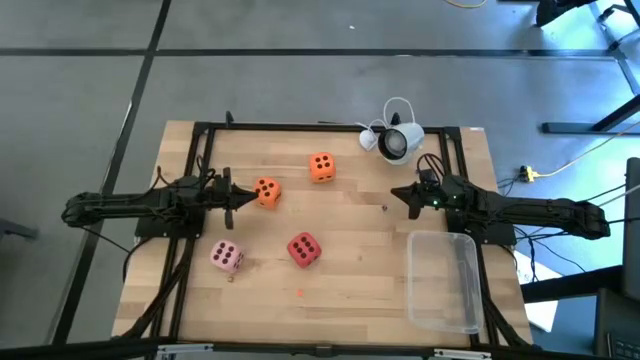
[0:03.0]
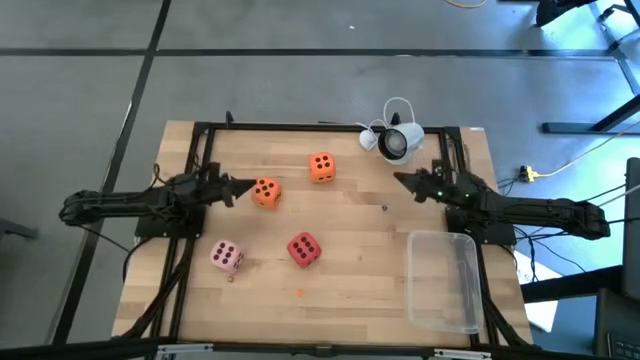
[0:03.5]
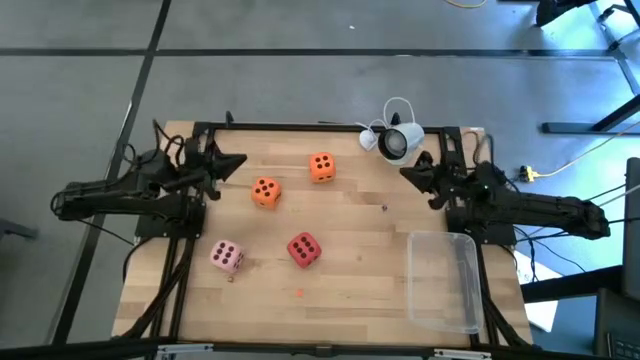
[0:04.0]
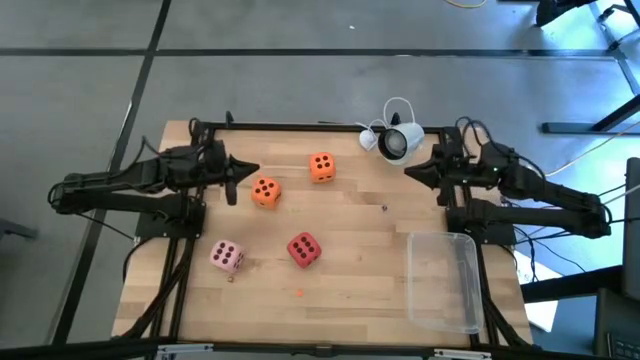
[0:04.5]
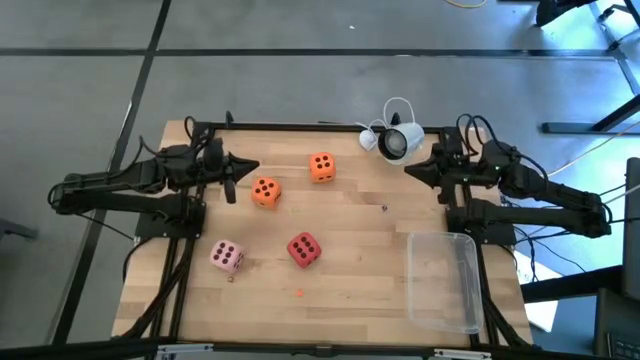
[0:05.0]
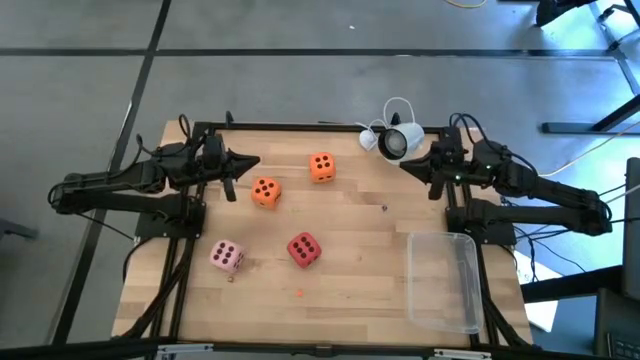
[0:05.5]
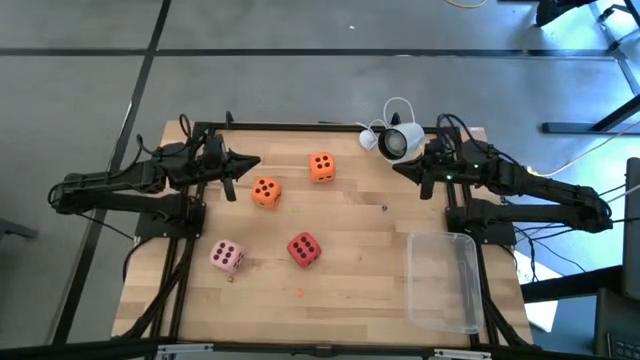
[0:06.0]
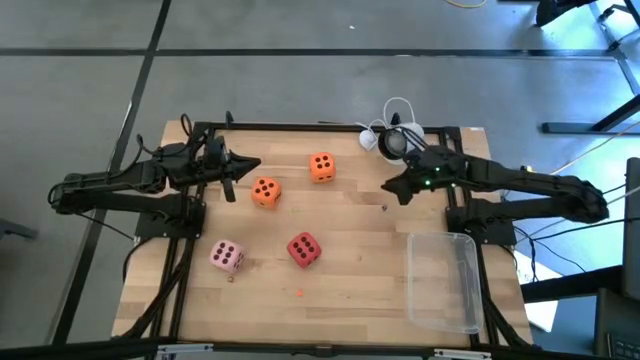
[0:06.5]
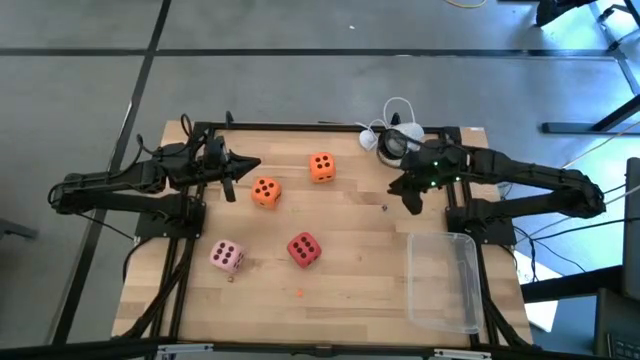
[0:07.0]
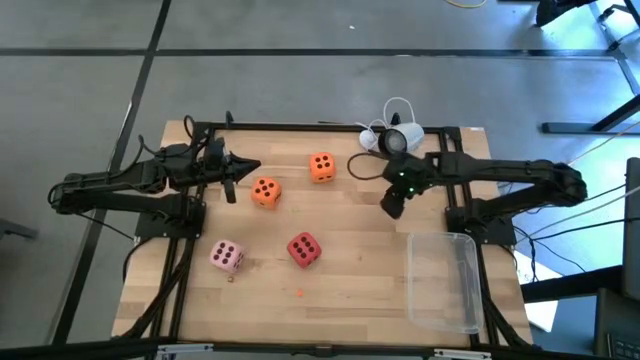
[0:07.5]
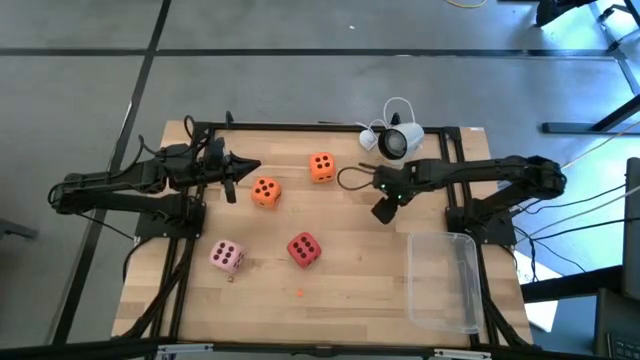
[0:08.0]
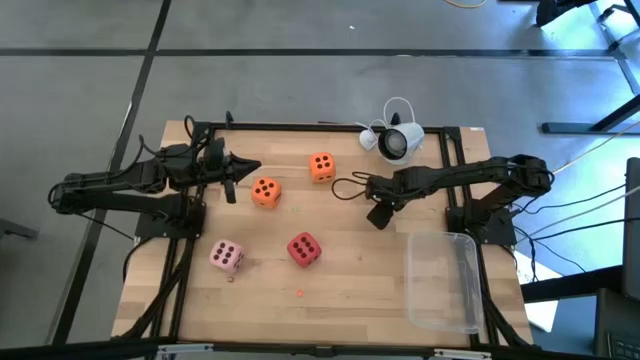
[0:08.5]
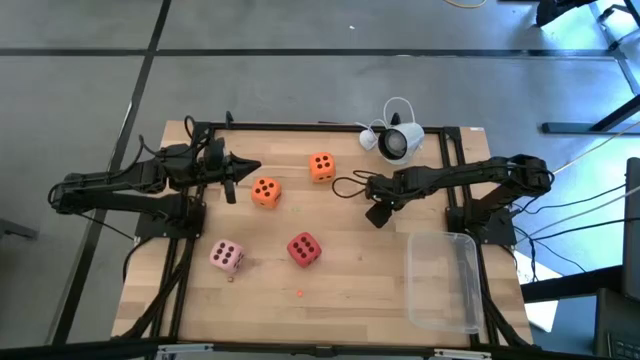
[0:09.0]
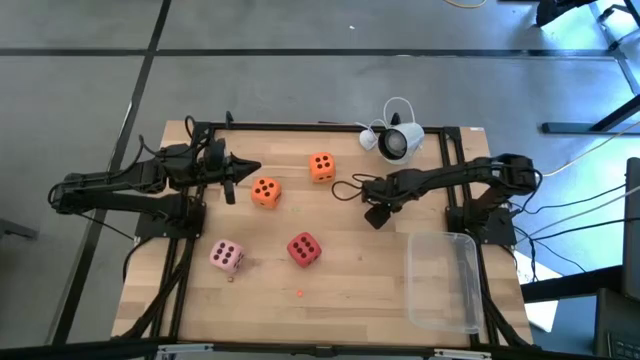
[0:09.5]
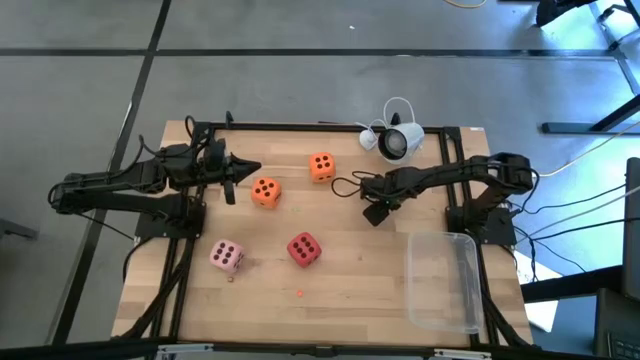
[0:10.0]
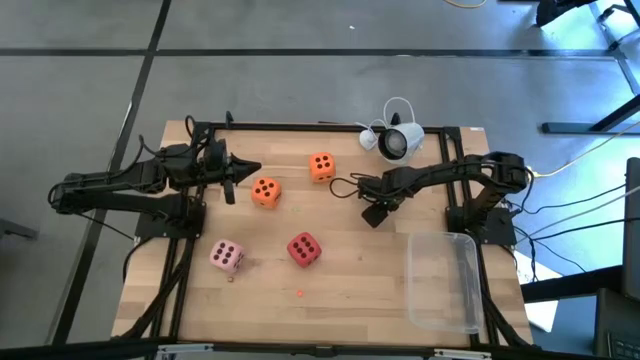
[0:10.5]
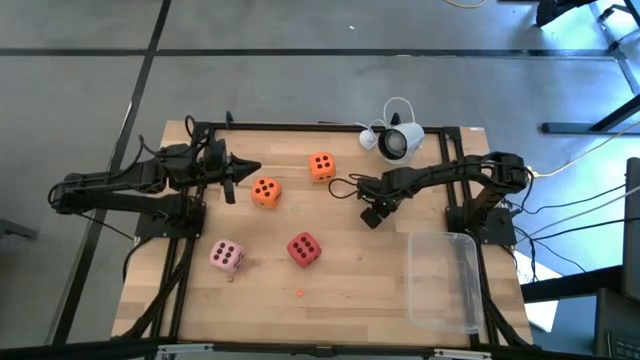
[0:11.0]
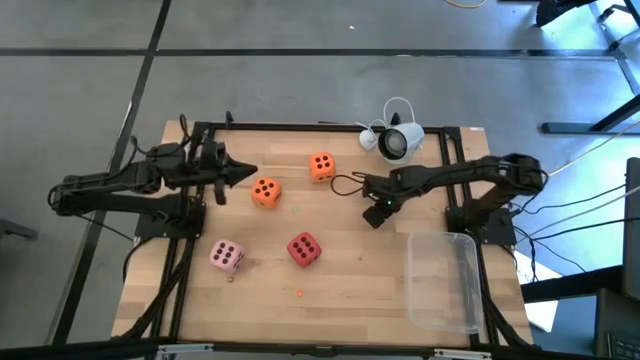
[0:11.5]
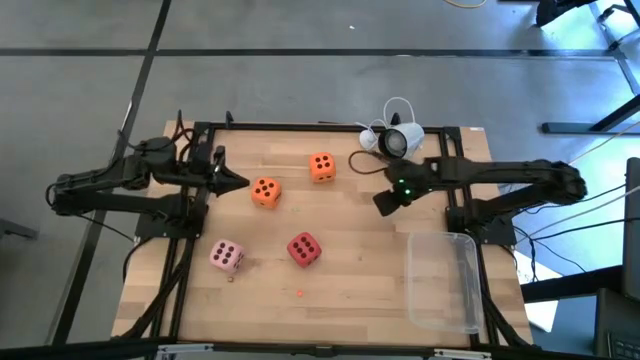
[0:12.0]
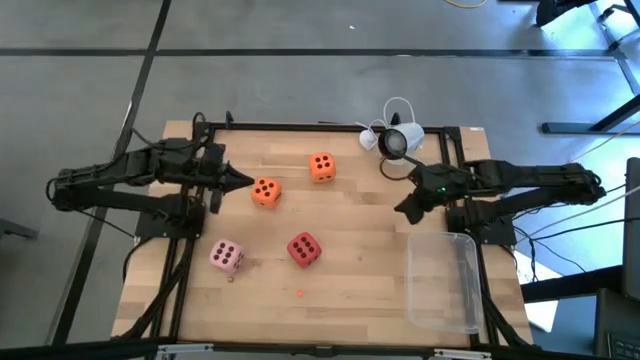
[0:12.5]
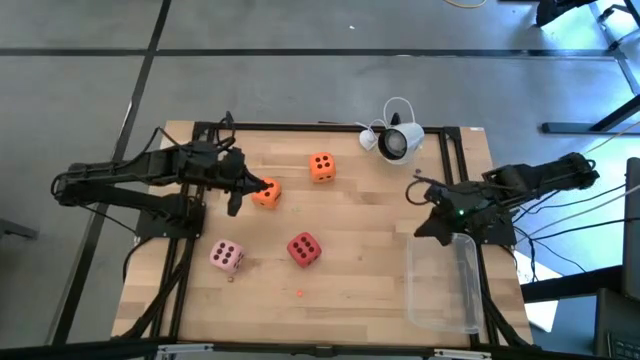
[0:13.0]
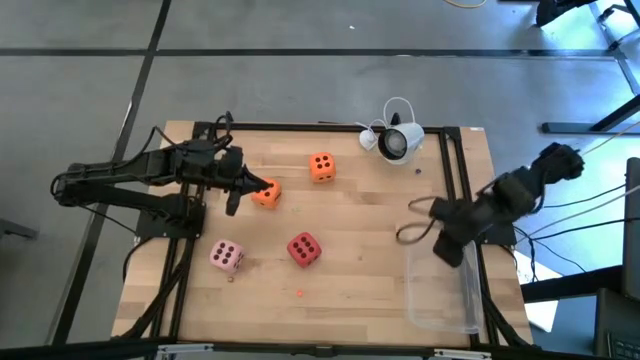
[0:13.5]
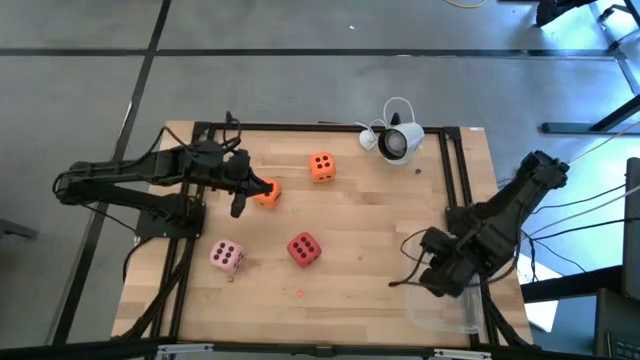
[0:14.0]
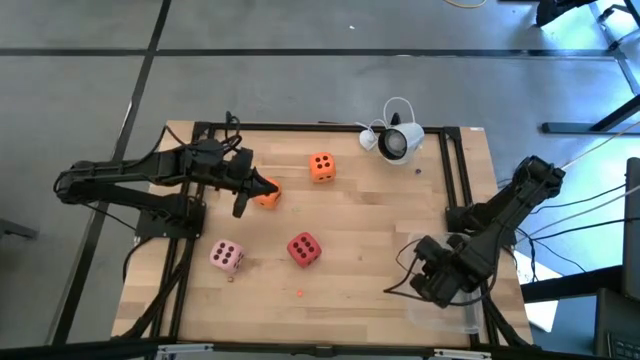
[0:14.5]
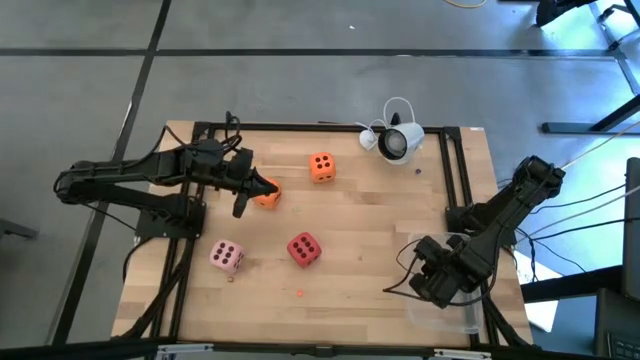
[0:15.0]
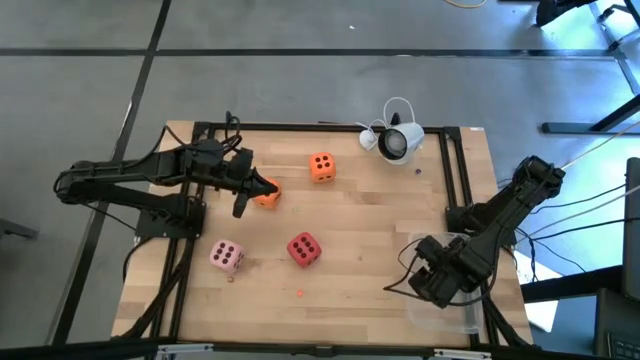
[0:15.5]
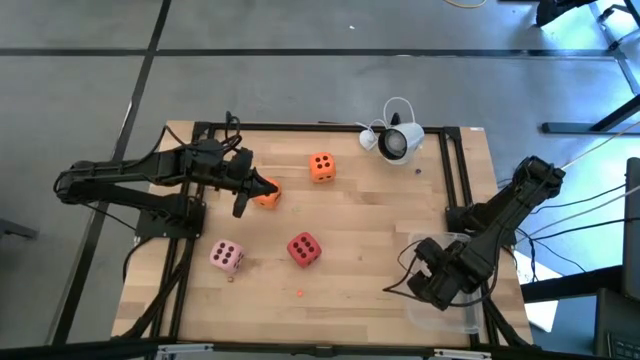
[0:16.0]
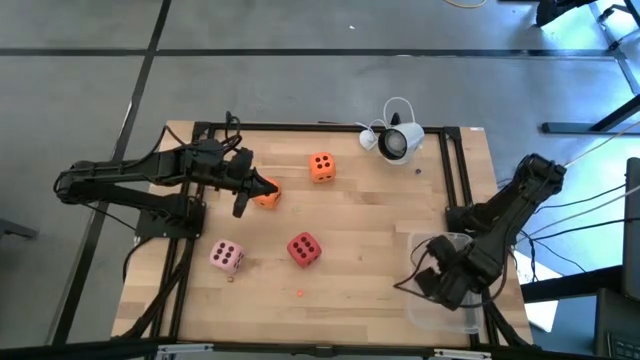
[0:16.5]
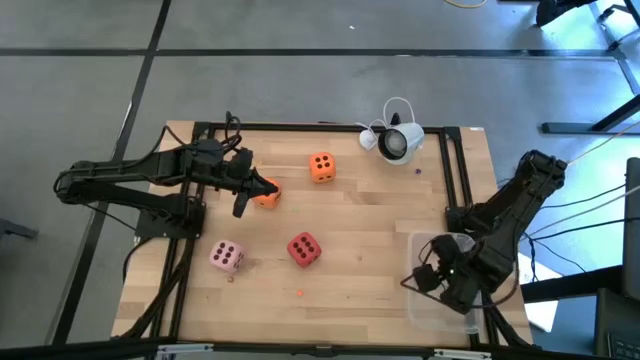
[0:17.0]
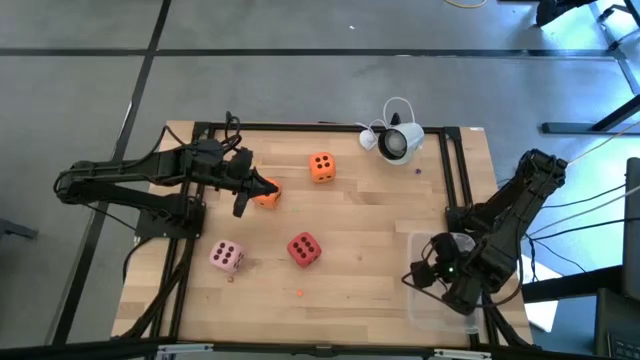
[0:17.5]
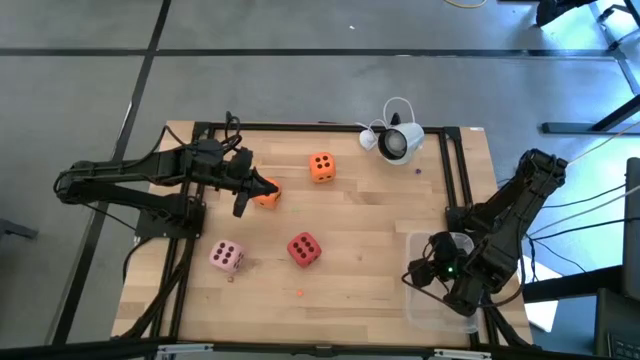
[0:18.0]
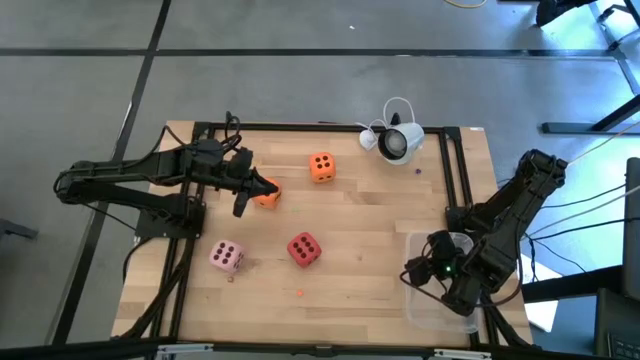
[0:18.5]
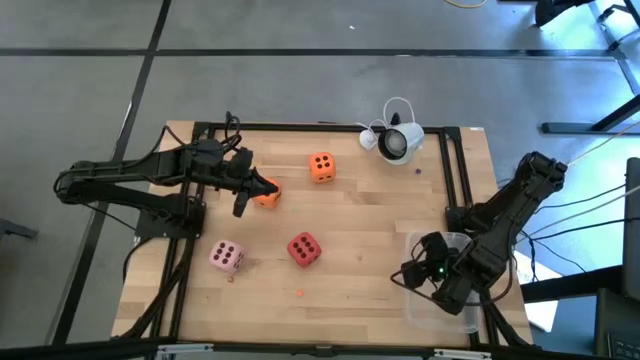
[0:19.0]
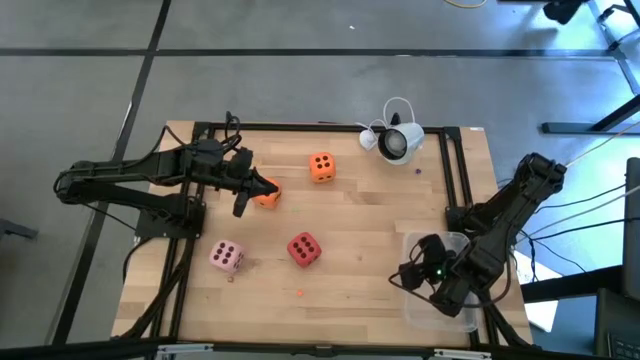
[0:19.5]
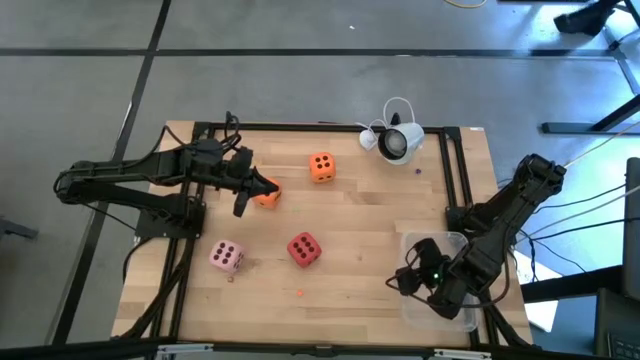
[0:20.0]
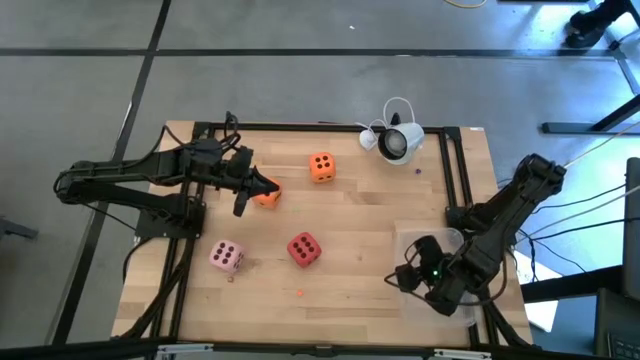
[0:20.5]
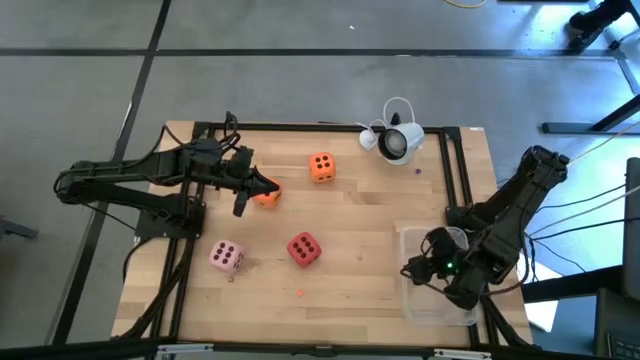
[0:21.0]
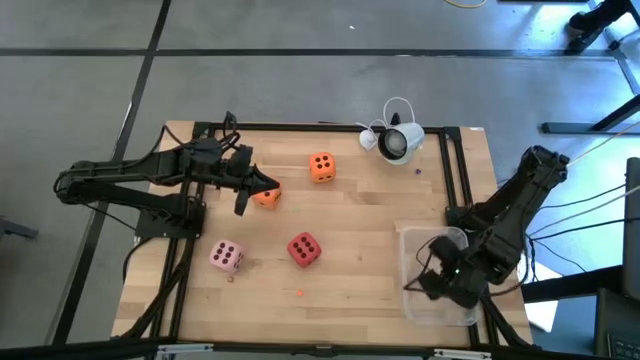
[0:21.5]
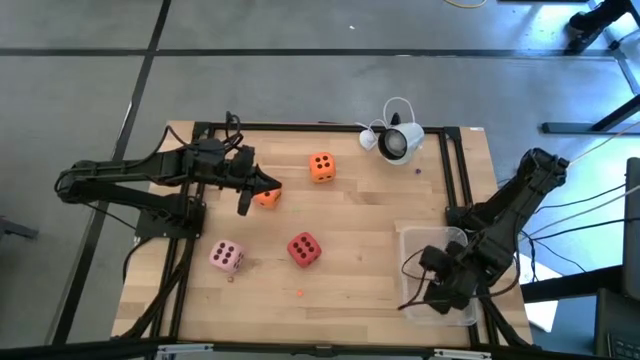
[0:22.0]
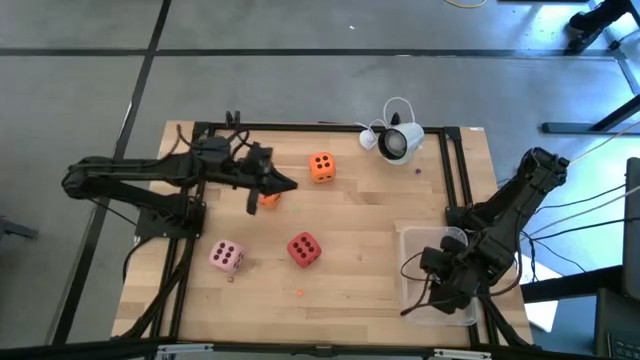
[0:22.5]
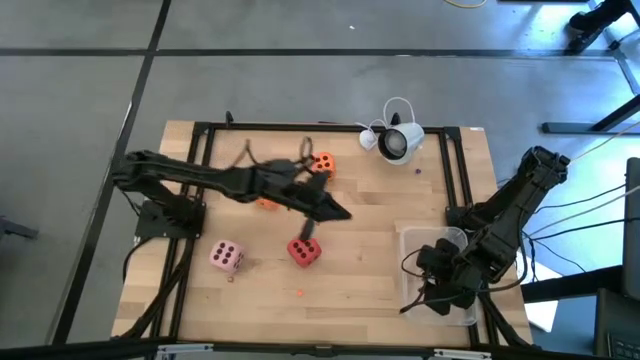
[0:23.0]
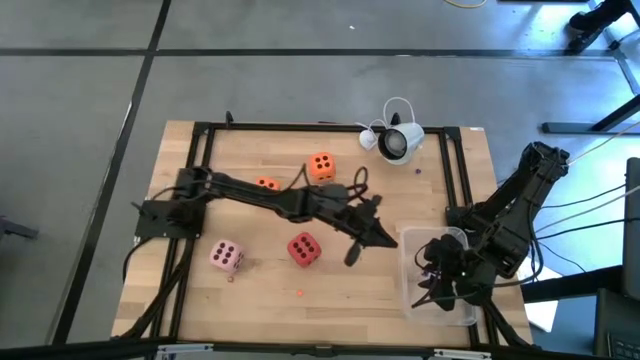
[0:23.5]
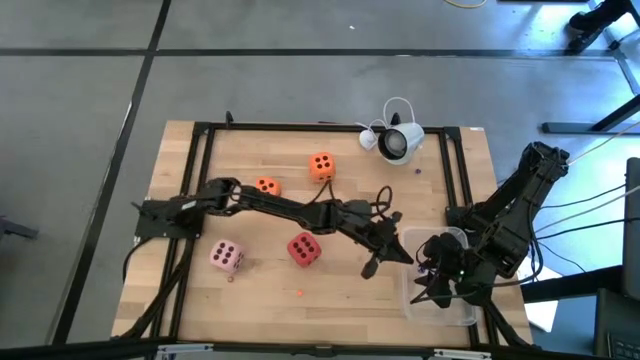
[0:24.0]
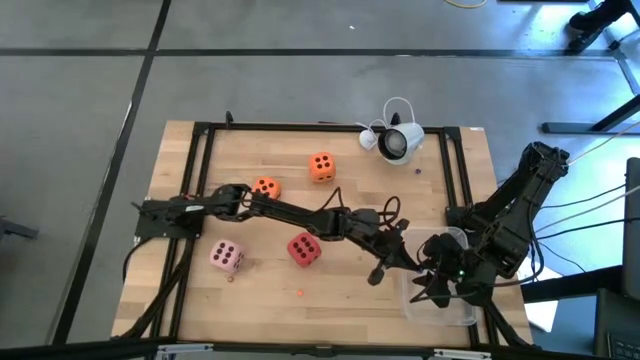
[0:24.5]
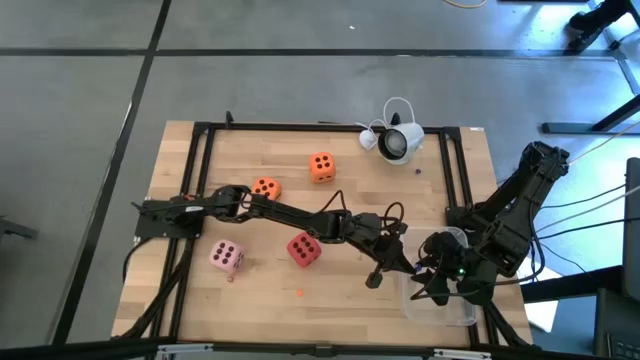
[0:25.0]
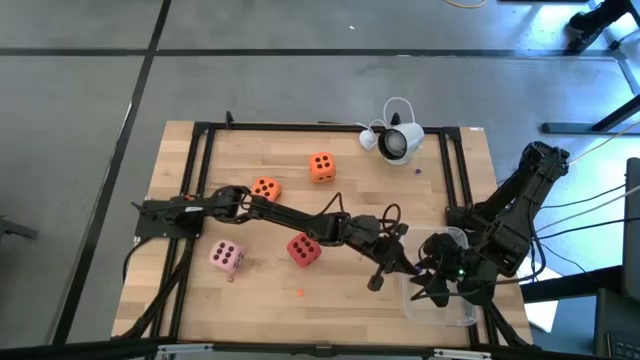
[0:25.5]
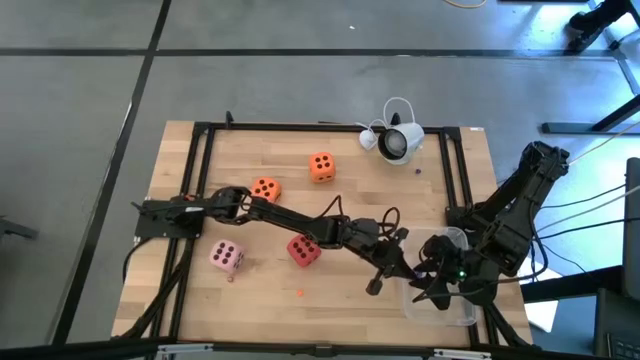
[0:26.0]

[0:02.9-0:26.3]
Task: Pick & Place Dice
Put the blue small die into the transparent bin
